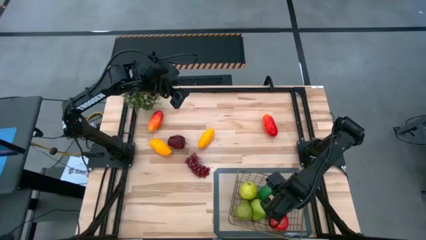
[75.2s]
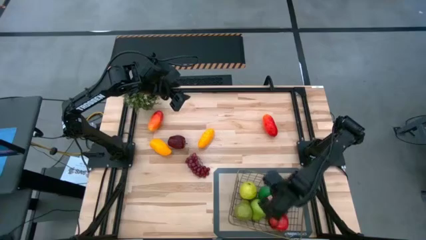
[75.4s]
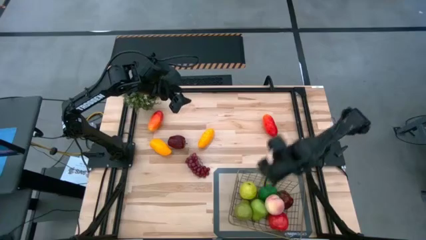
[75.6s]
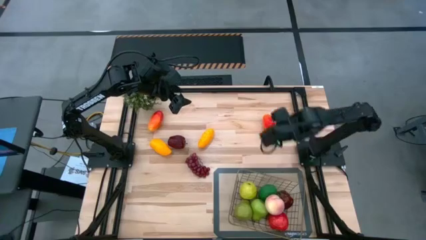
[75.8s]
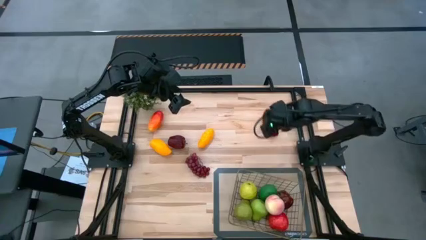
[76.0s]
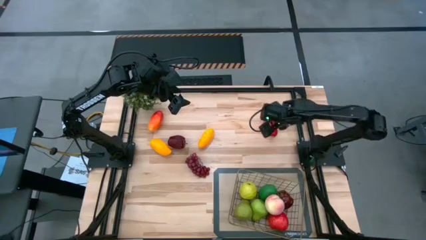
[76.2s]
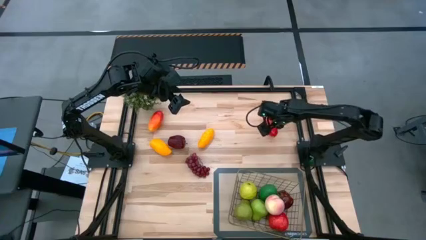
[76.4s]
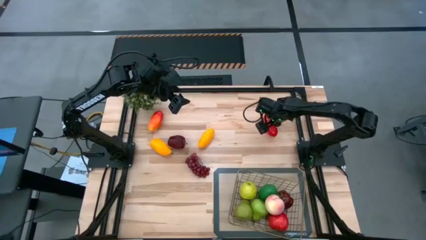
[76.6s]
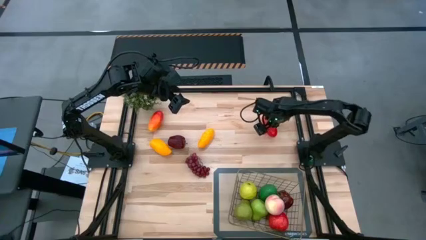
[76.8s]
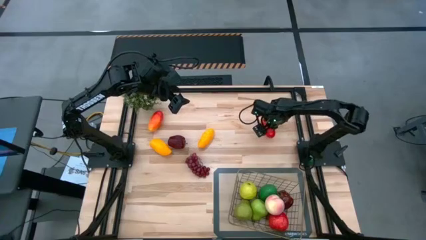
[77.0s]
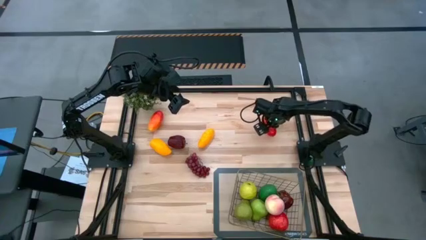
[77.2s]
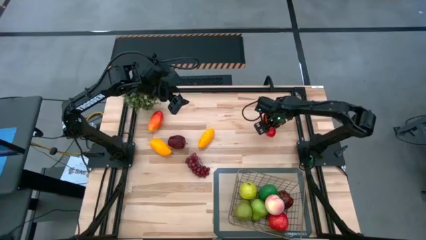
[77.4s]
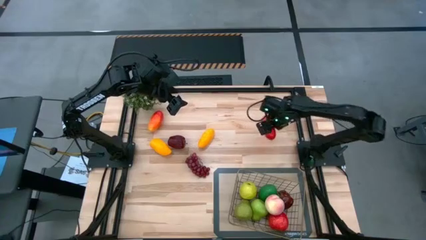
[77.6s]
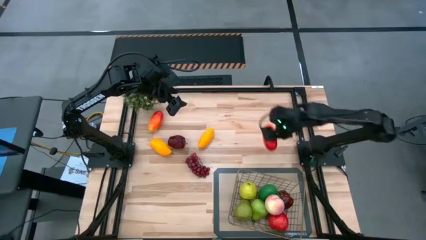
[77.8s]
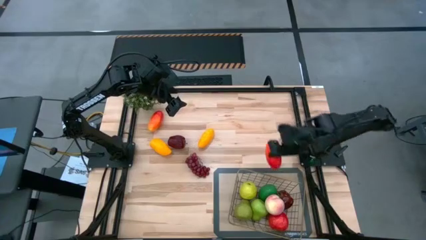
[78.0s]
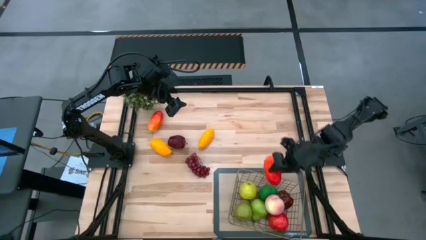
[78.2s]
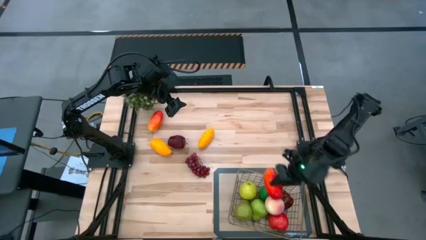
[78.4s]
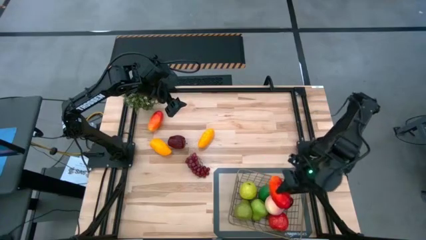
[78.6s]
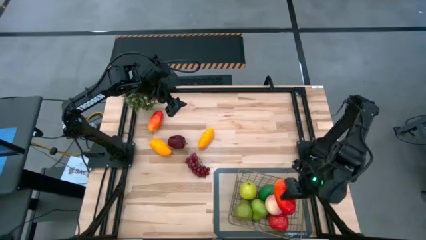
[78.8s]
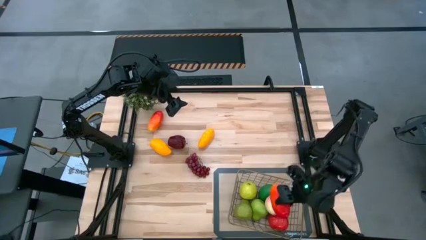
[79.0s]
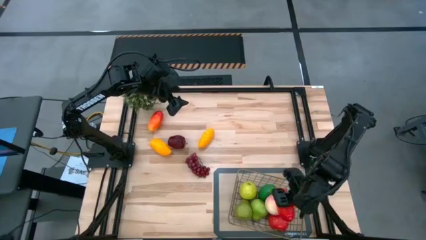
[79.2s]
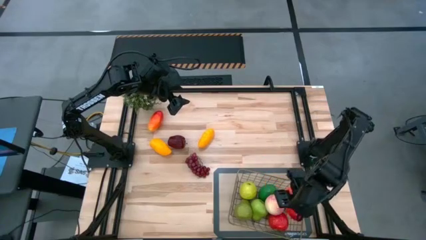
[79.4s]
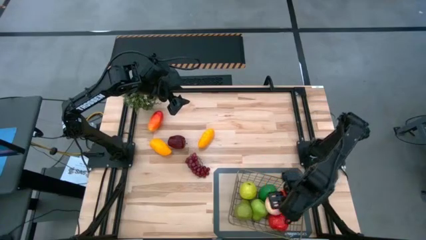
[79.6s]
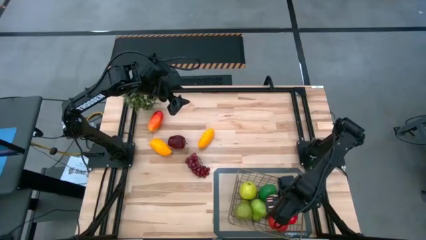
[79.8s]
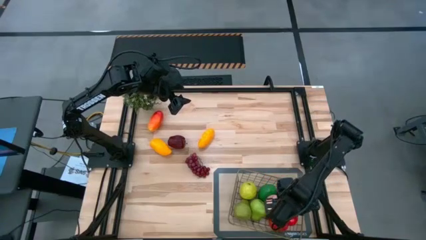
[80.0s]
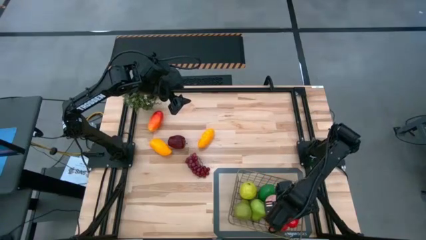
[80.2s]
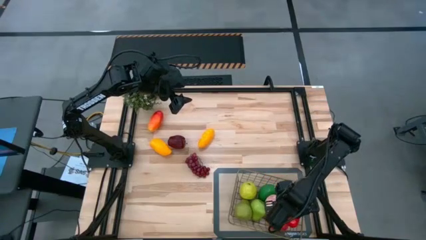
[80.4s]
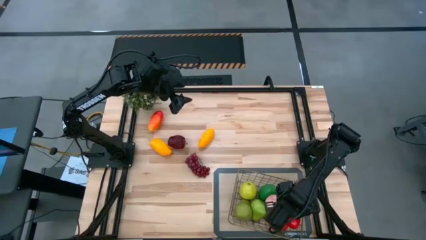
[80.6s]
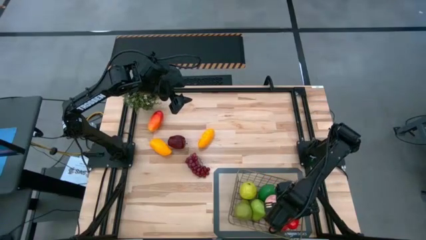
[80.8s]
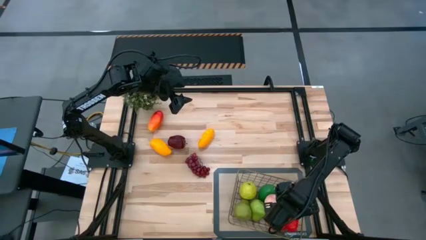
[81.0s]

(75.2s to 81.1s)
Task: Build produce basket
Put the right orange mango into the wire basket

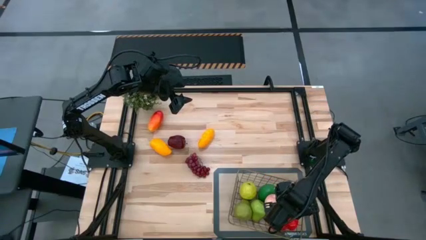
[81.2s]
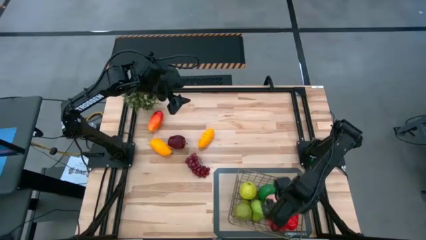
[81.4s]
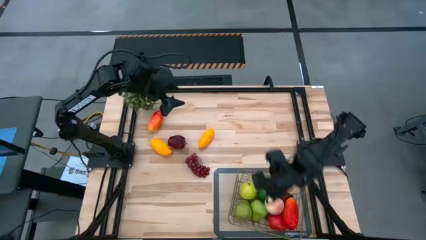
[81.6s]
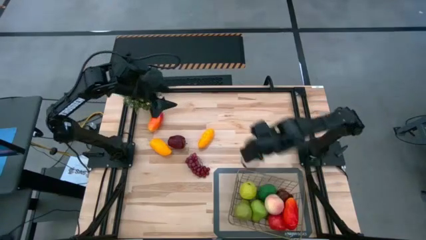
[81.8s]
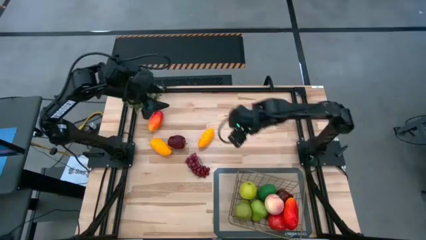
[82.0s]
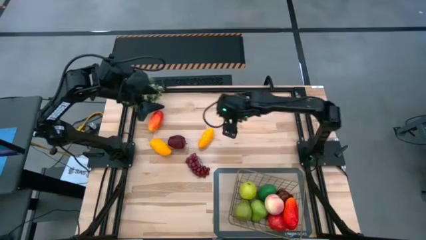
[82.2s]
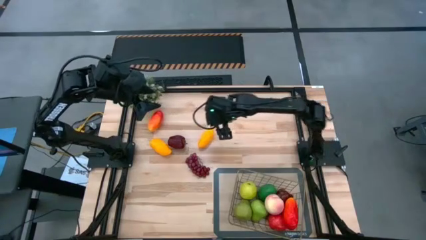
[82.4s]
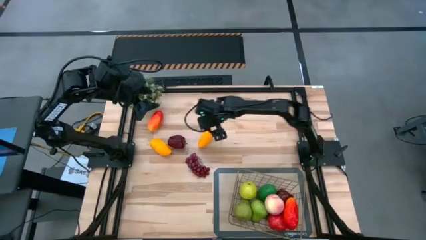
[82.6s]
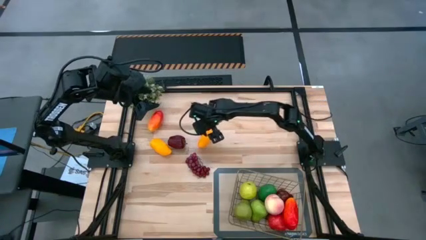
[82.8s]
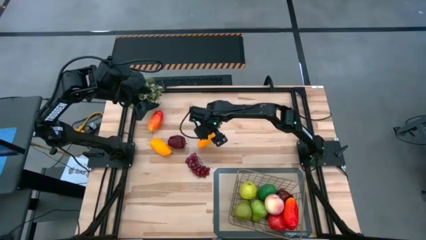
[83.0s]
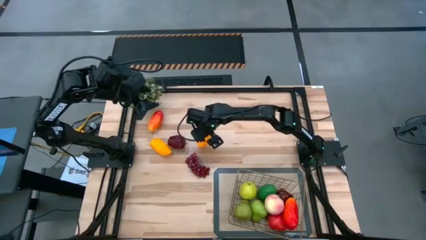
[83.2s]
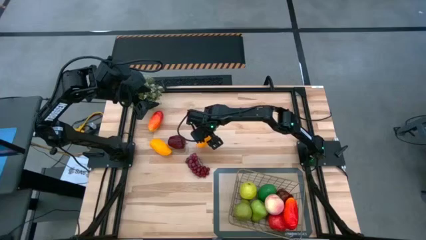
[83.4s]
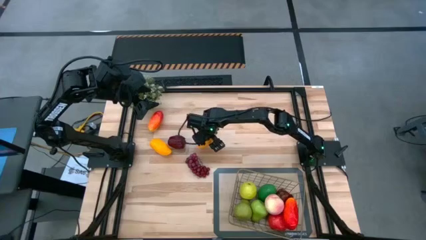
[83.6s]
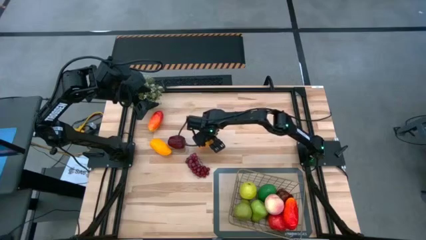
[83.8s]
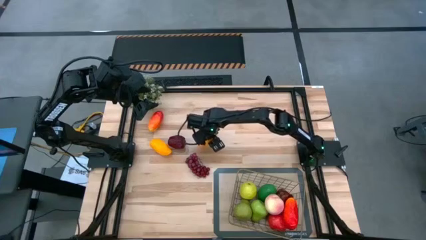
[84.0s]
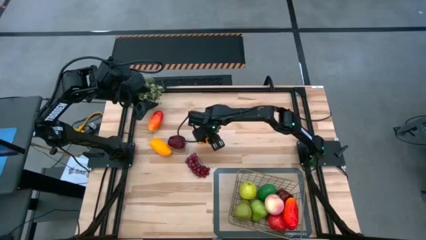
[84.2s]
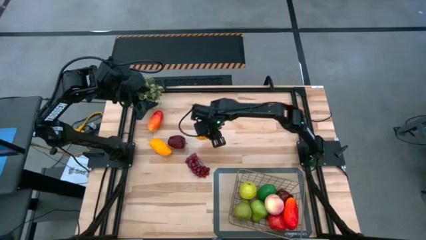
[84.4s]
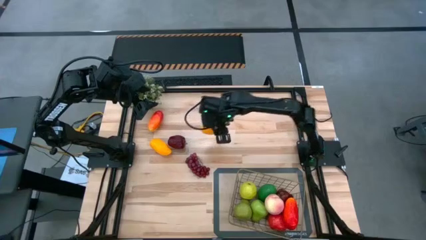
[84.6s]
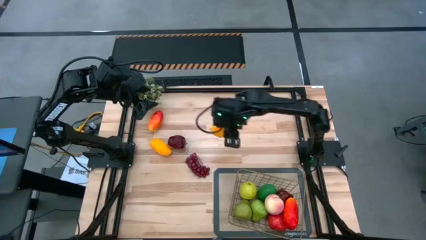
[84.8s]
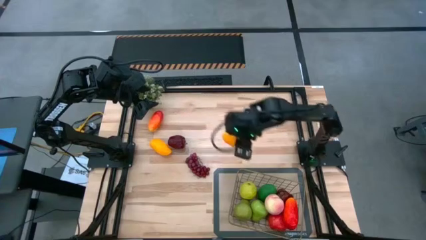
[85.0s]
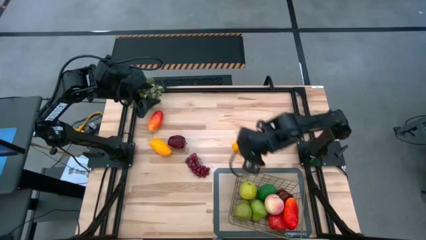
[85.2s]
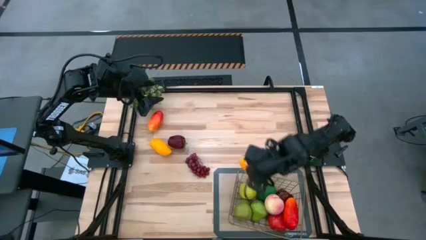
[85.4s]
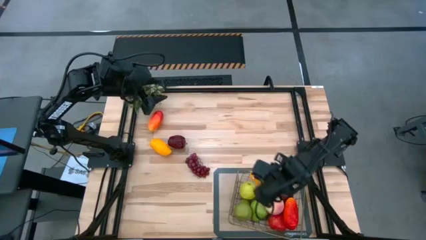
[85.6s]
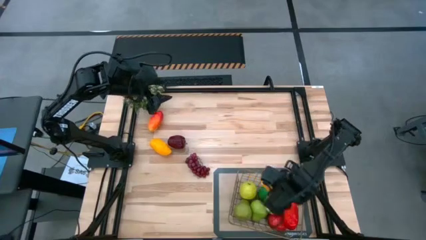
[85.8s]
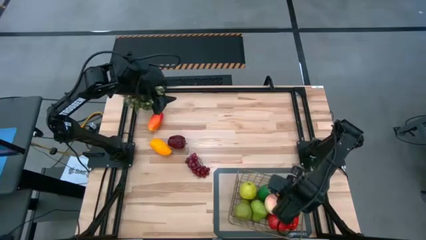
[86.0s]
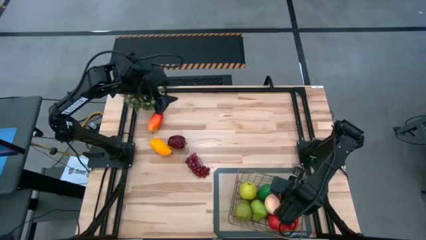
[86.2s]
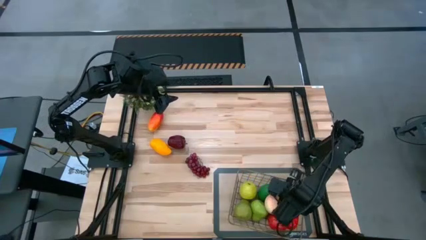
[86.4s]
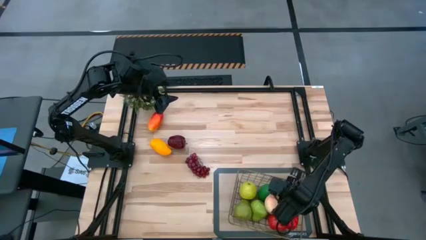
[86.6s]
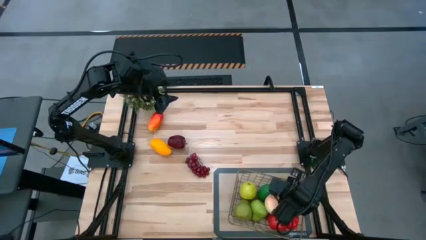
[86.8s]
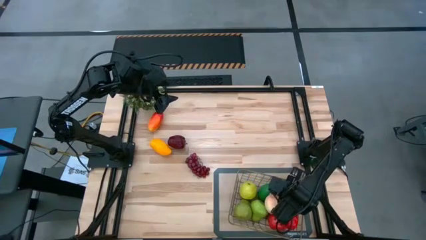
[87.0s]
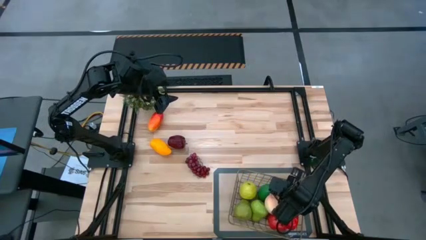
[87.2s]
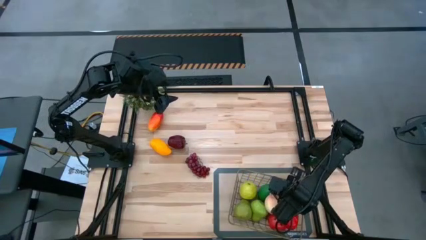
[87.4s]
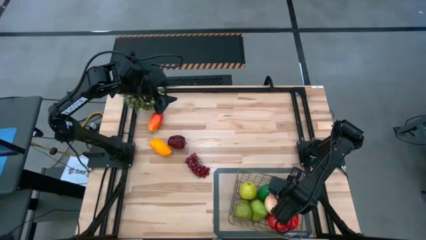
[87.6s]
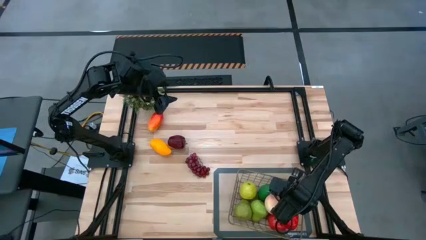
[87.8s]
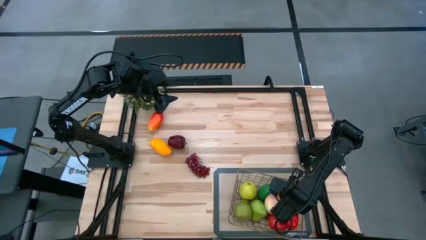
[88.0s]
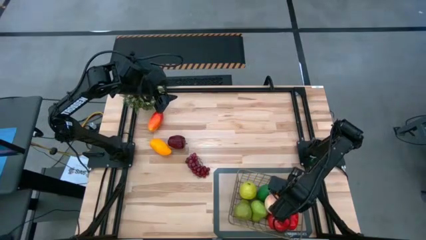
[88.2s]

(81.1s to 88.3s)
Put the right yellow mango into the wire basket

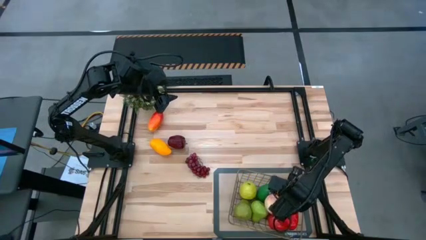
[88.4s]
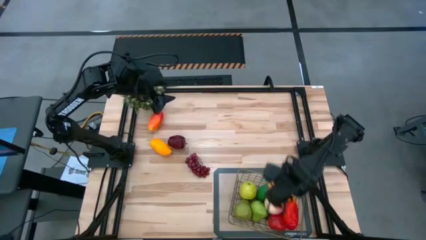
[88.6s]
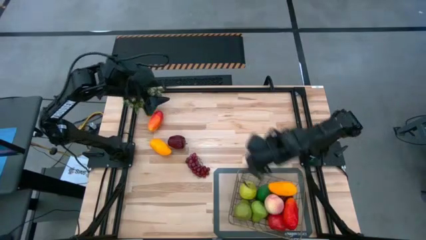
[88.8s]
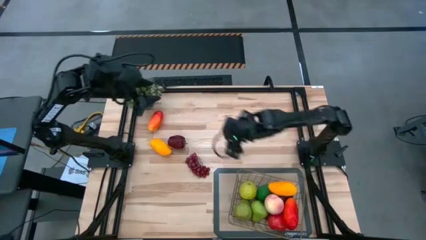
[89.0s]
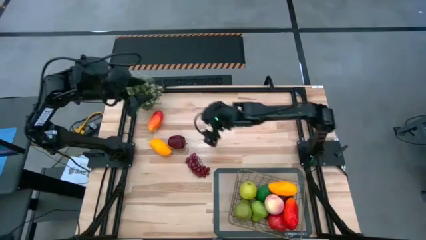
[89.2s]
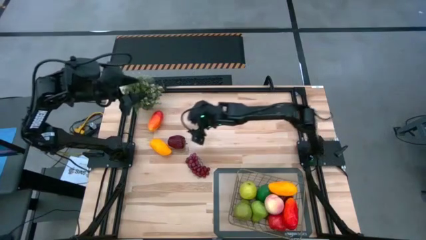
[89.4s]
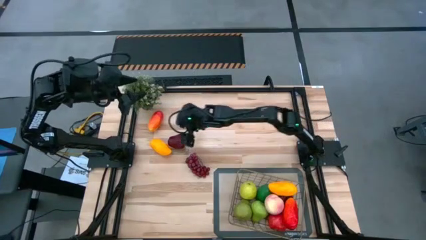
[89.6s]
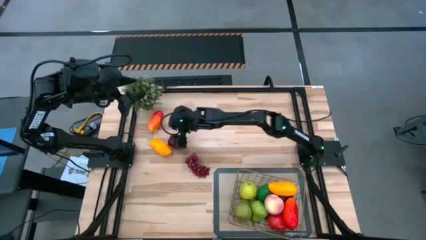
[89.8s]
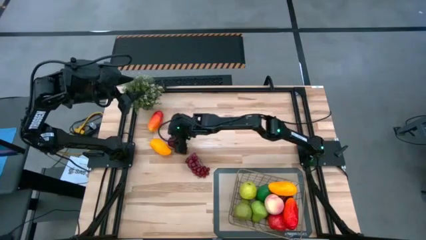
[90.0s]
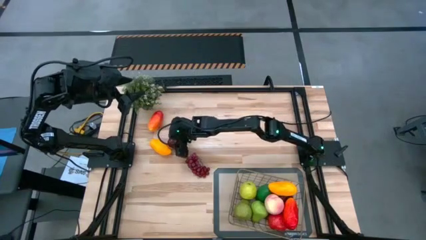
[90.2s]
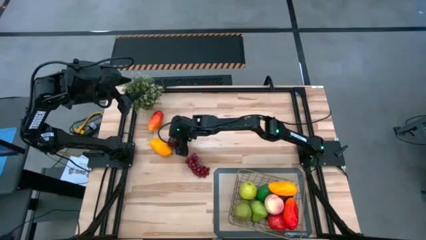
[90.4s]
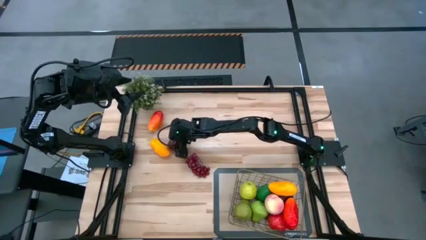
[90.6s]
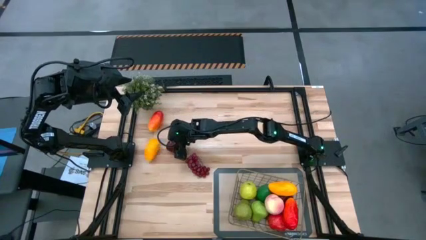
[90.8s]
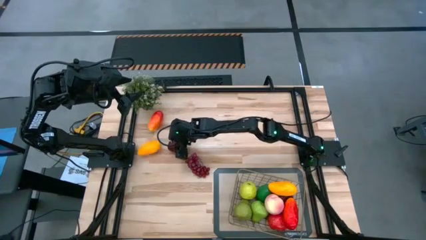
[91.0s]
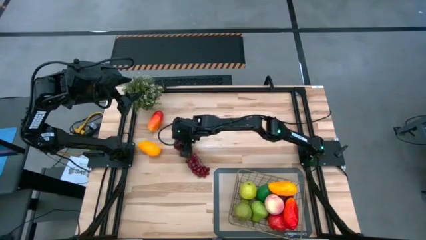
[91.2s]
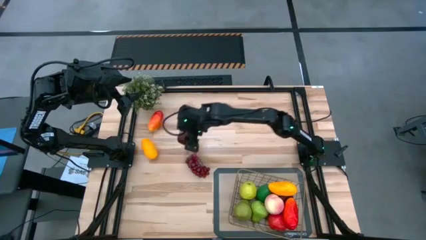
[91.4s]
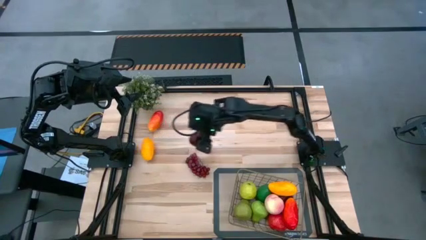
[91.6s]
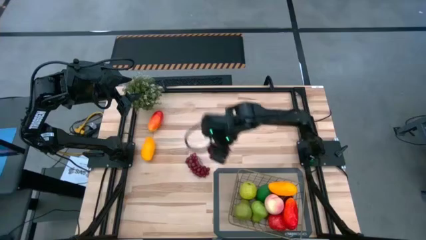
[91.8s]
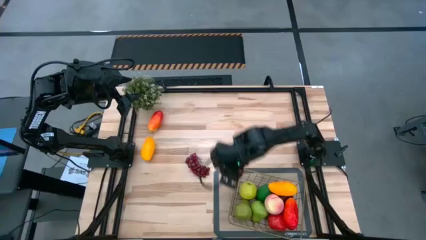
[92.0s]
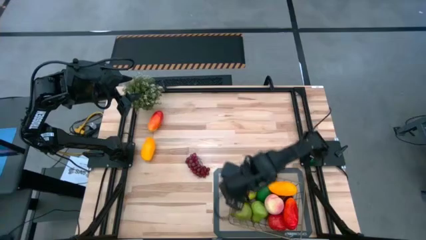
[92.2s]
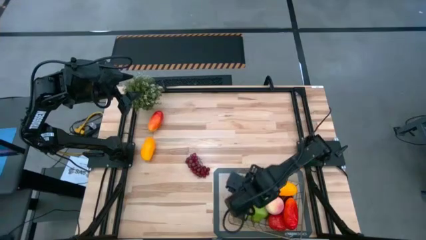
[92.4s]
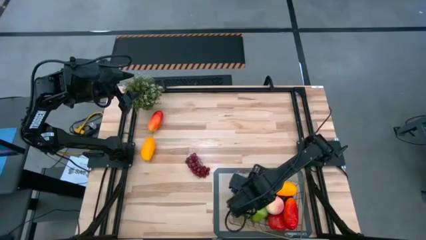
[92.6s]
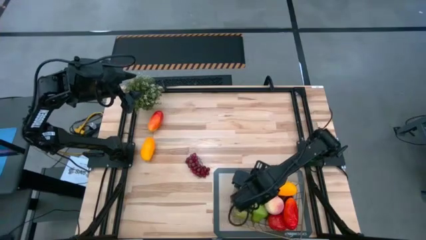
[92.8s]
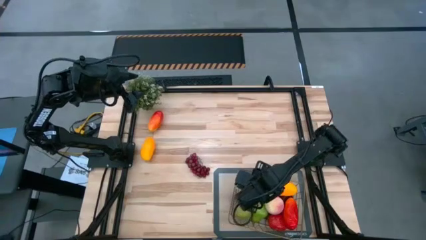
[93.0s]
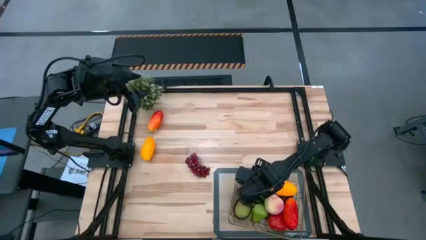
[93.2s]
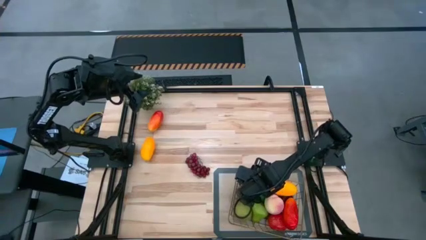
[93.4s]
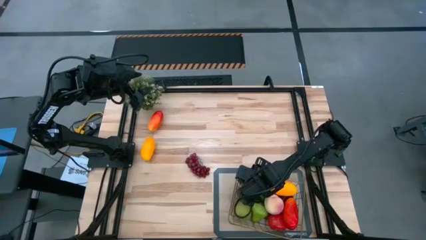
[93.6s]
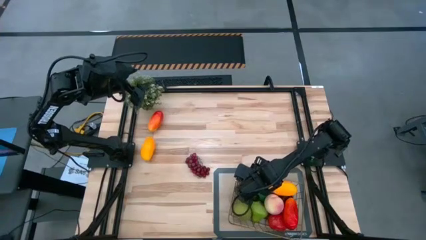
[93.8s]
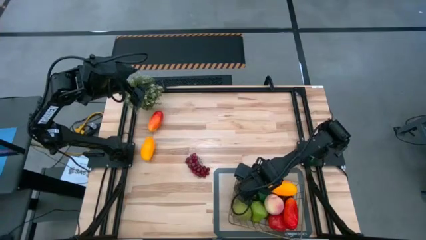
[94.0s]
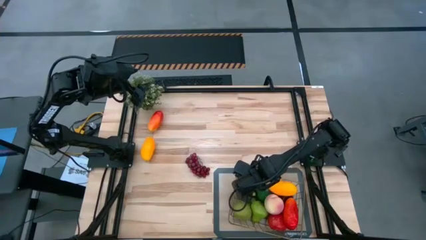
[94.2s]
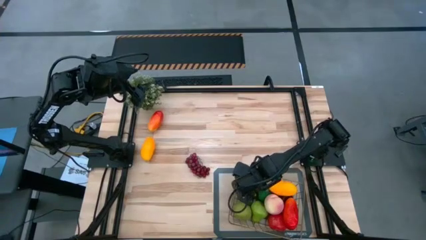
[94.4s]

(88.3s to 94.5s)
Put the dark red apple into the wire basket
